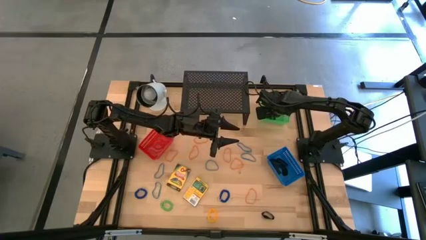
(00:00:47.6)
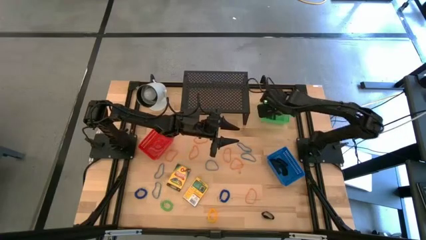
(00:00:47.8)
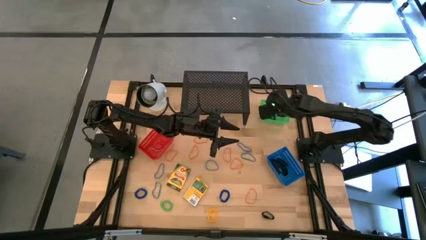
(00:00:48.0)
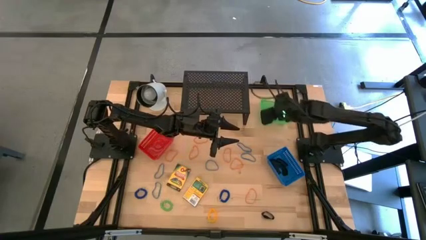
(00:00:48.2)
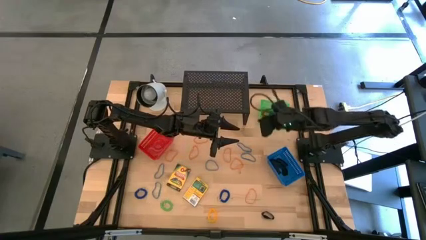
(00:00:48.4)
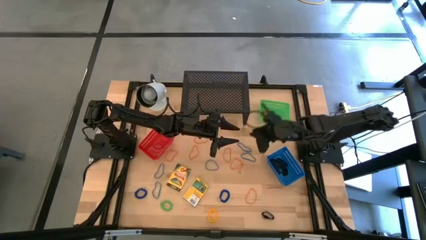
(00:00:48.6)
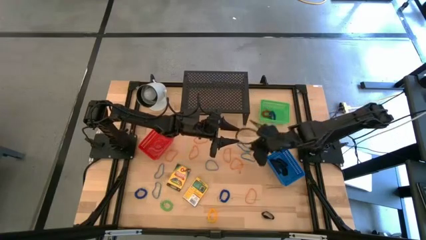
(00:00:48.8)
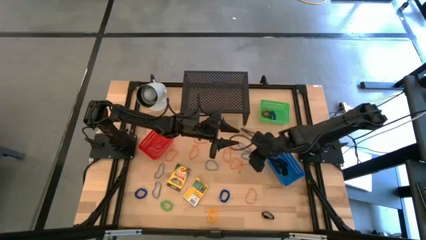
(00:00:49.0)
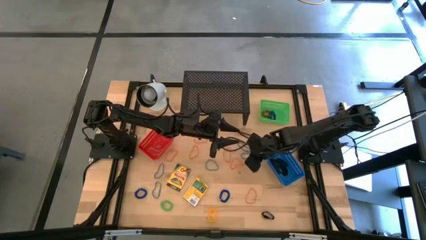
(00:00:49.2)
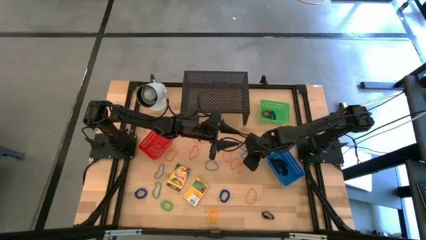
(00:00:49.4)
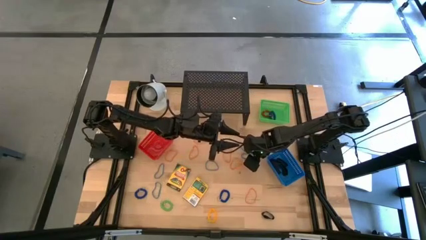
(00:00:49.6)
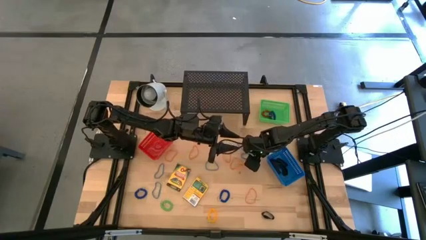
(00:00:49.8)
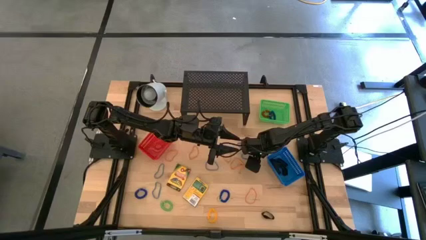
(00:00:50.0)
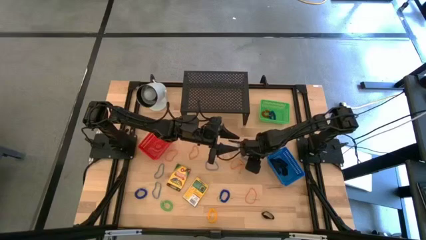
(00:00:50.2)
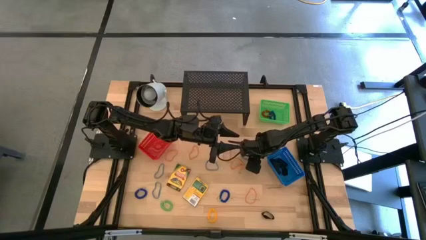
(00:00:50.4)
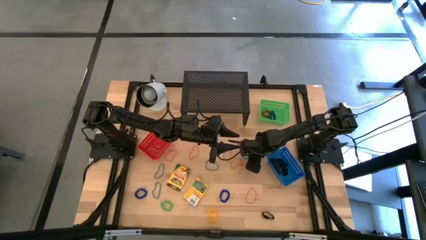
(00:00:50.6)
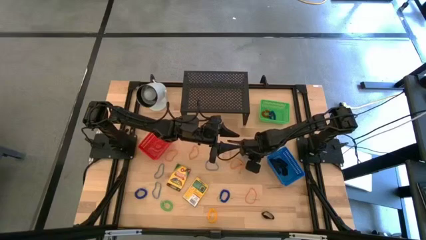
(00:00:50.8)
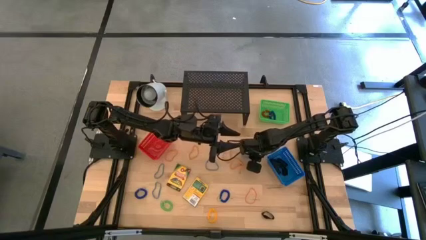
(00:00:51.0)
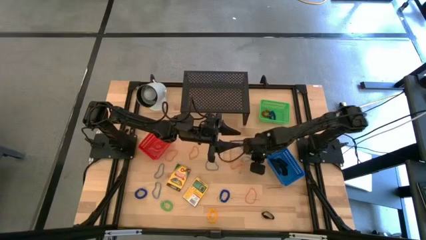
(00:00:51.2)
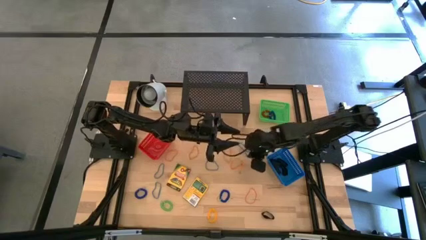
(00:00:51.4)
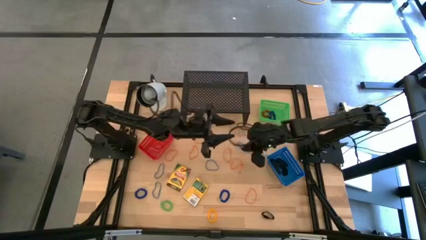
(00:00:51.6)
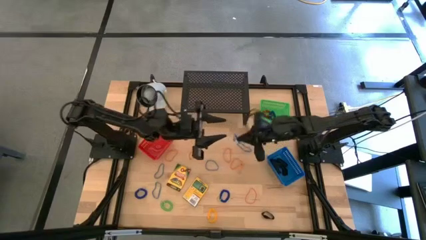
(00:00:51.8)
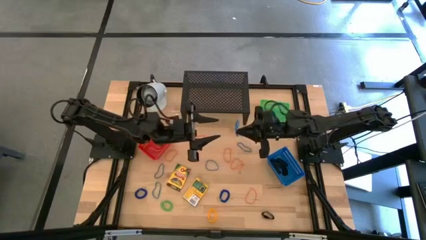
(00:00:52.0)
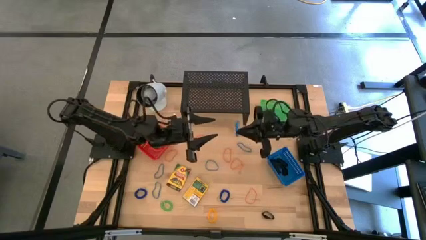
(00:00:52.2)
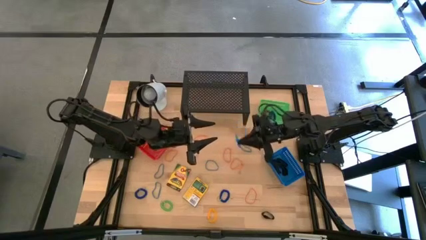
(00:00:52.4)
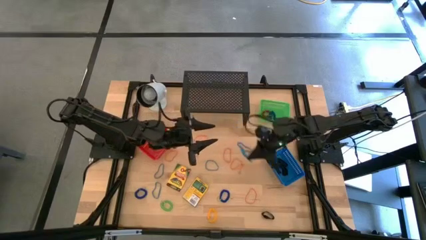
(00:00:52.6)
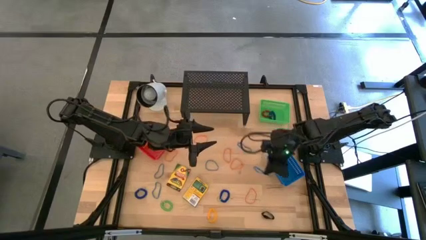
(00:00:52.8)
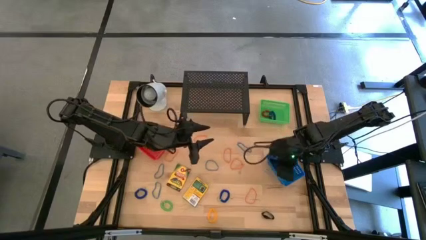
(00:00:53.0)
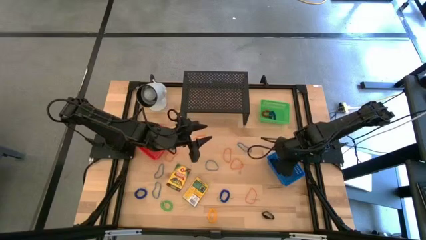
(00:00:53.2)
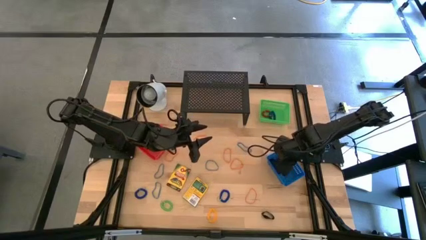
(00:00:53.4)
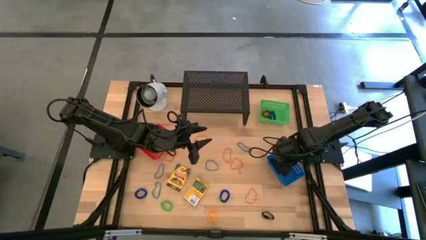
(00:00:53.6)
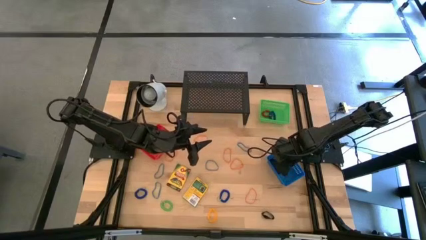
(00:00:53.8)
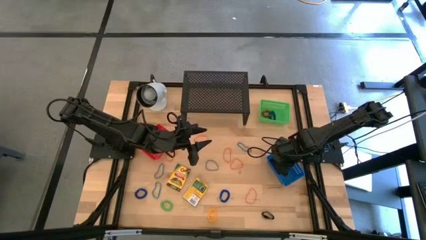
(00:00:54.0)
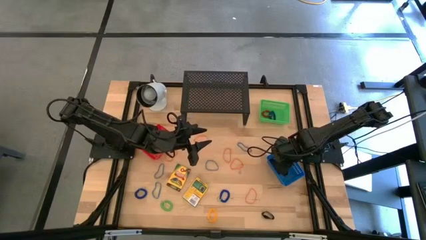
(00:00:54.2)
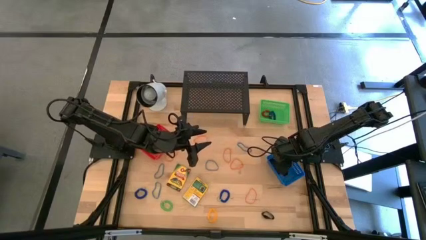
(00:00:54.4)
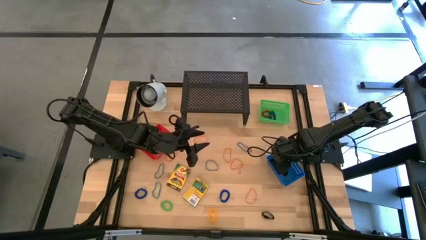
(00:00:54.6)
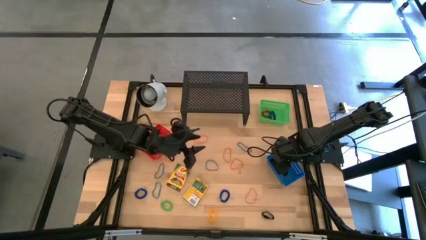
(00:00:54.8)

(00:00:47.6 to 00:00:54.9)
Task: Pick & Place Office Desk Supplies
Put the blue rubber band into the blue bin

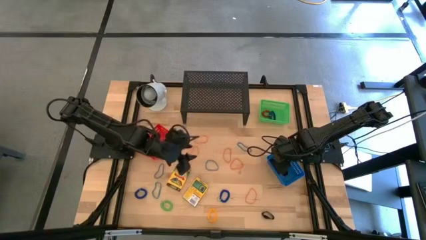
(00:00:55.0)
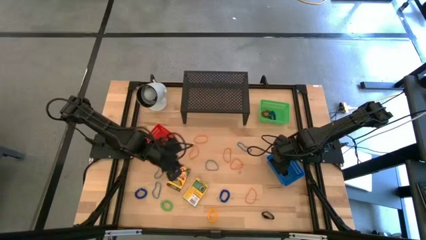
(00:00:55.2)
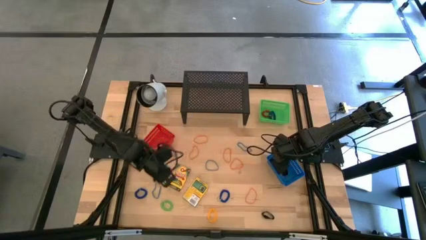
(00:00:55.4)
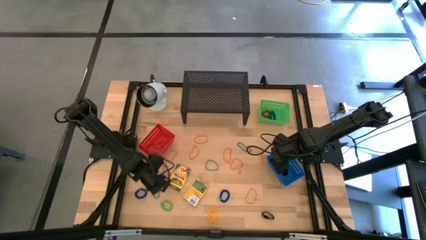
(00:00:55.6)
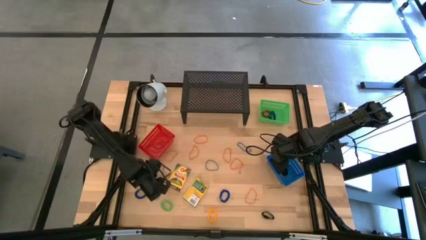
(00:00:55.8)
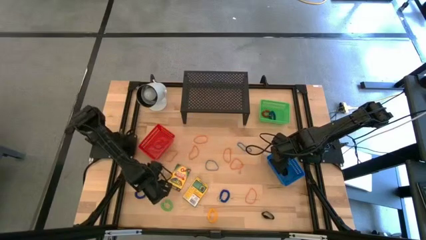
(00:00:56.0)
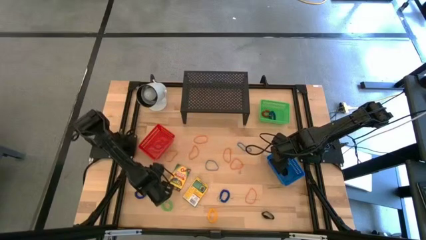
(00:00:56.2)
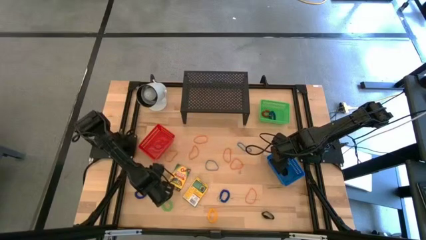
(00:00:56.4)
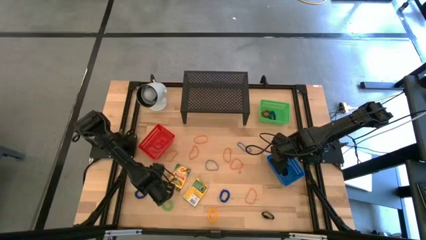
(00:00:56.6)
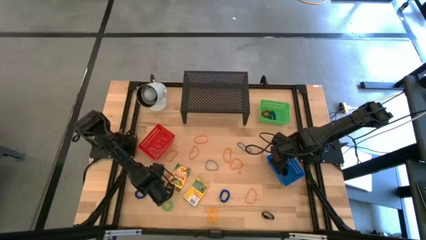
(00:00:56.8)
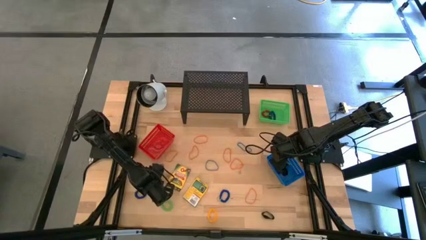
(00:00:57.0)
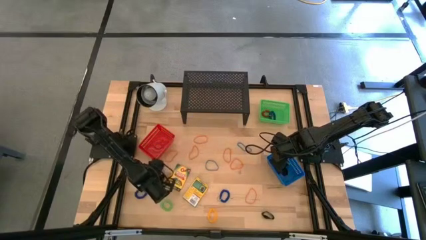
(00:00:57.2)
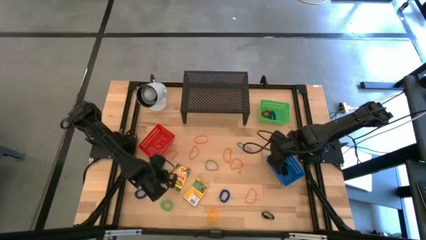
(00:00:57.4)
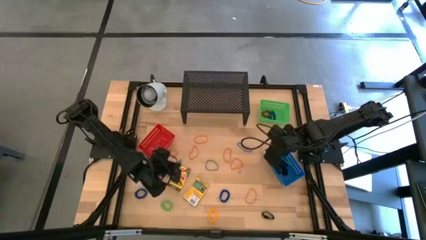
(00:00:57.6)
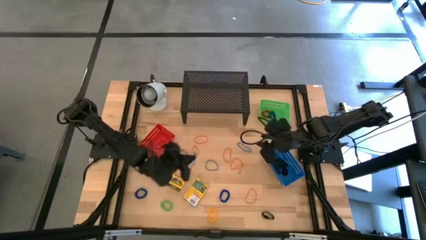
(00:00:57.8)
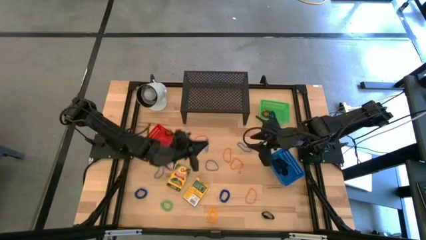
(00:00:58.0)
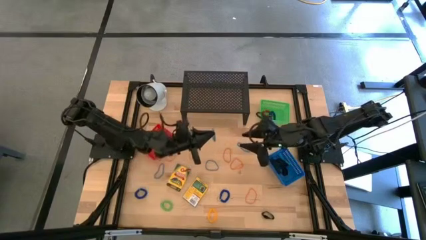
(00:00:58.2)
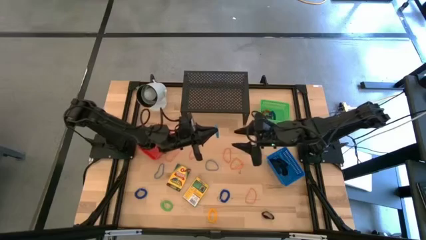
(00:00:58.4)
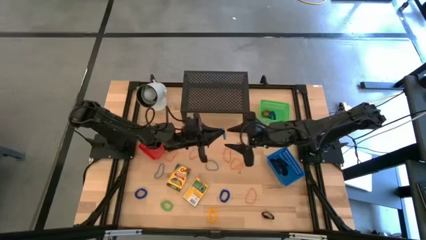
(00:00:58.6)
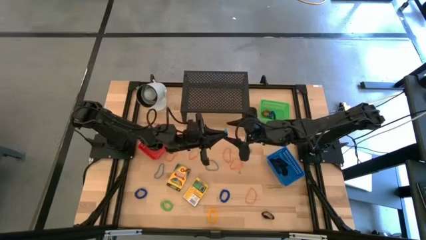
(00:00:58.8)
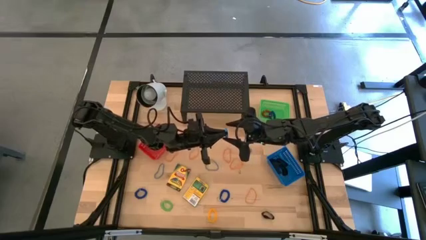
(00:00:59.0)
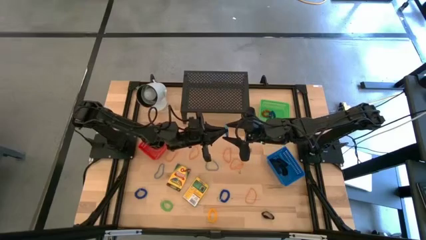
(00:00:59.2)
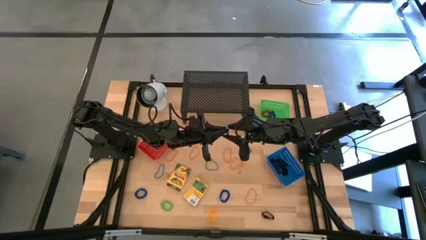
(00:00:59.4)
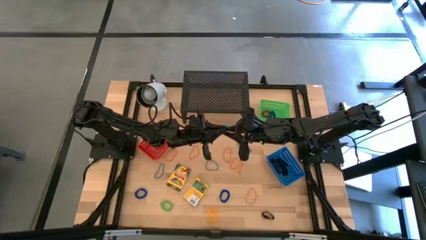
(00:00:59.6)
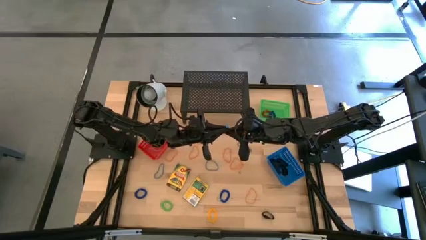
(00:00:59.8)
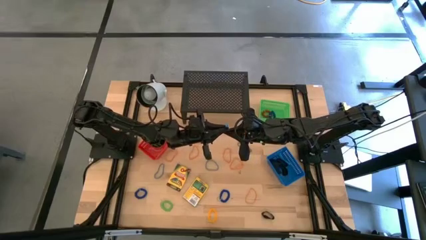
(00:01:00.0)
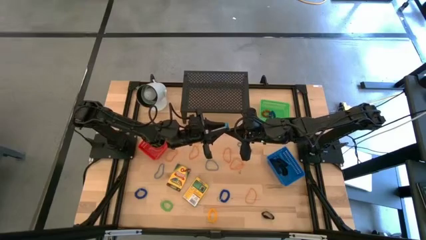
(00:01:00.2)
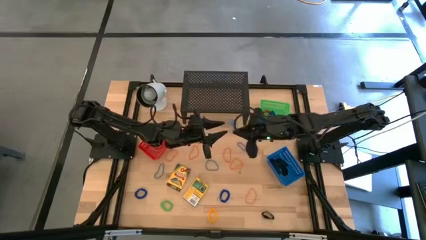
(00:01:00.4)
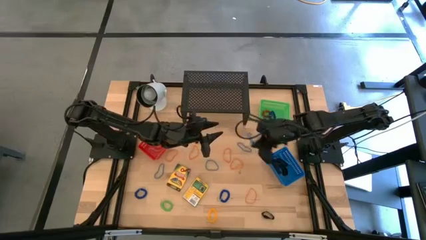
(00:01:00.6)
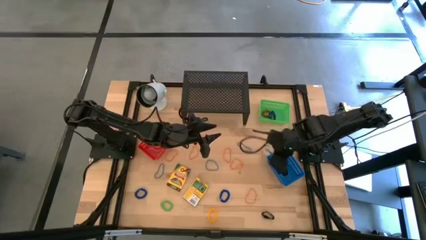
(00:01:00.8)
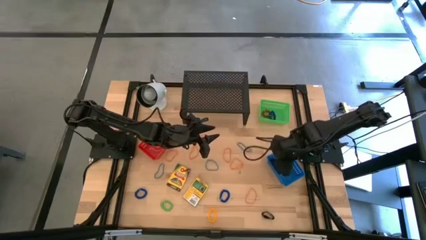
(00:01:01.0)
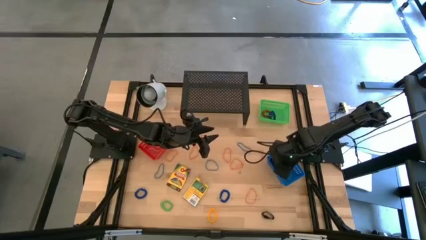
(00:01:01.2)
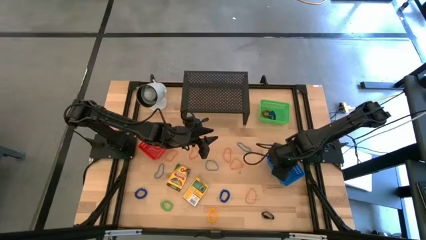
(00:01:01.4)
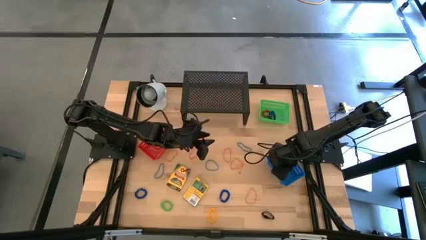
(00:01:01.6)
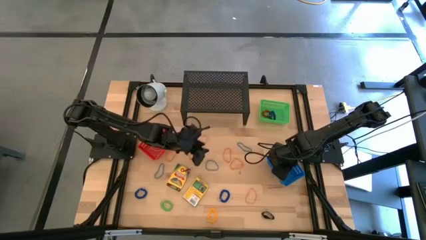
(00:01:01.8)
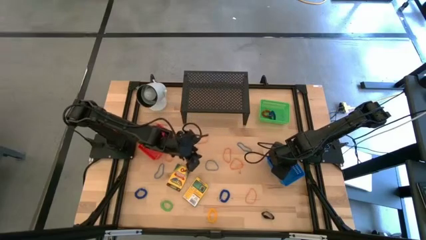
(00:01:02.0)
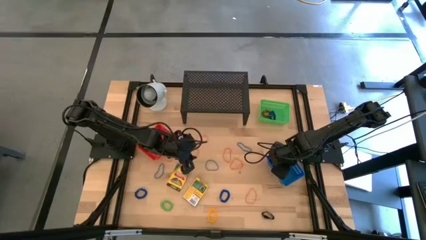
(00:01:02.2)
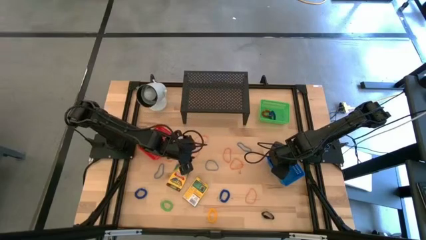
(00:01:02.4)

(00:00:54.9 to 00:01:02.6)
Put the rubber band into the blue bin
